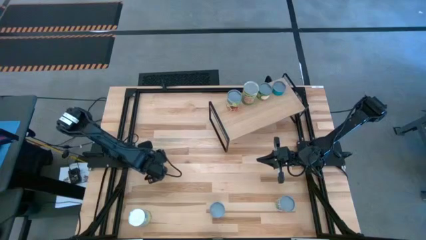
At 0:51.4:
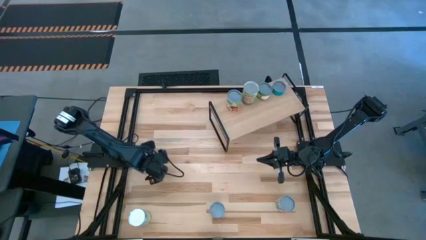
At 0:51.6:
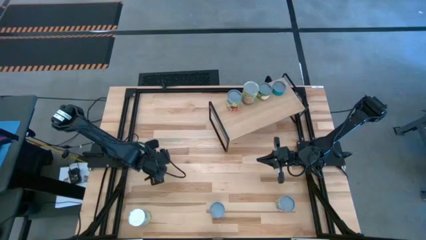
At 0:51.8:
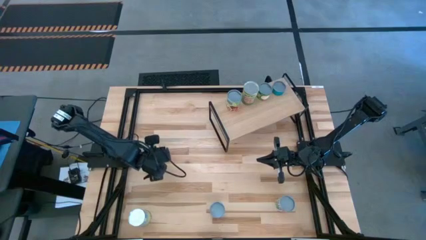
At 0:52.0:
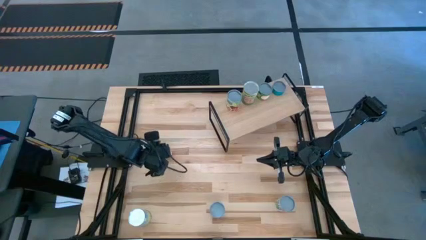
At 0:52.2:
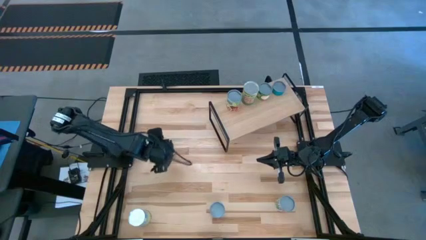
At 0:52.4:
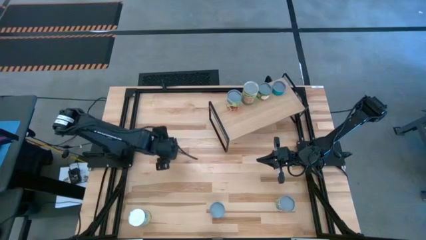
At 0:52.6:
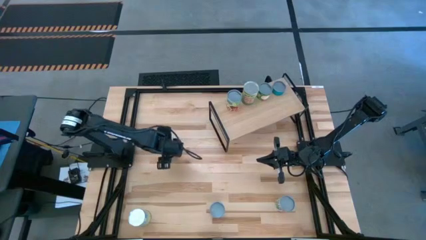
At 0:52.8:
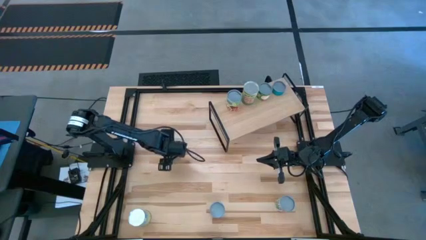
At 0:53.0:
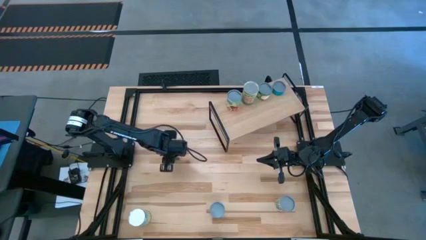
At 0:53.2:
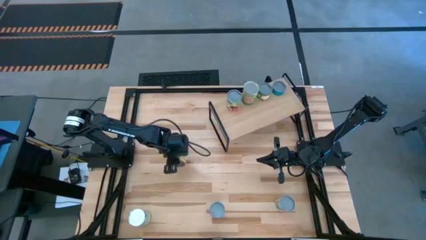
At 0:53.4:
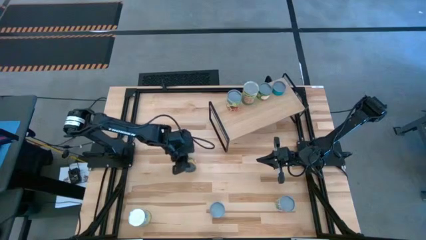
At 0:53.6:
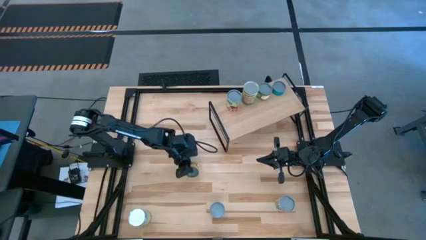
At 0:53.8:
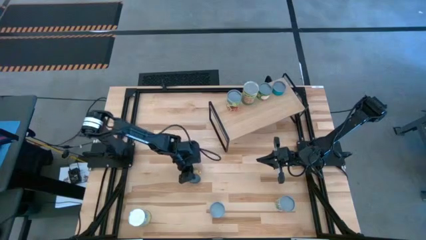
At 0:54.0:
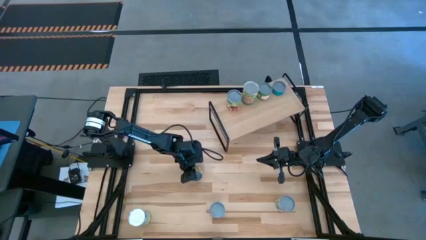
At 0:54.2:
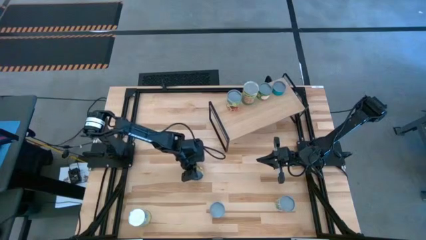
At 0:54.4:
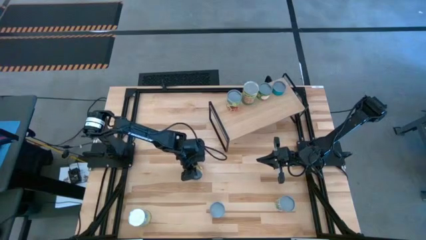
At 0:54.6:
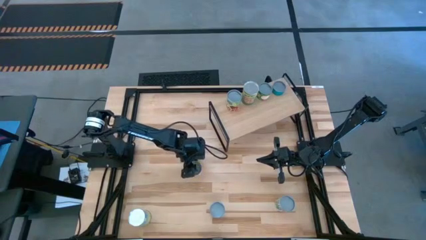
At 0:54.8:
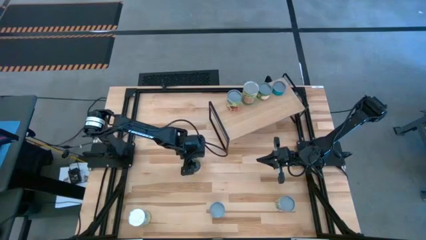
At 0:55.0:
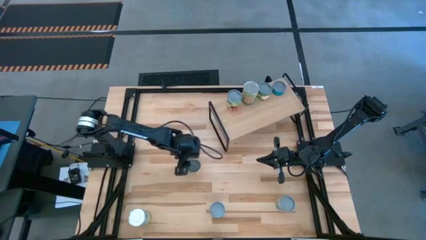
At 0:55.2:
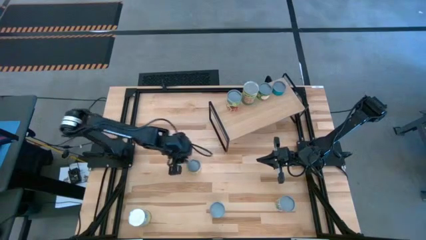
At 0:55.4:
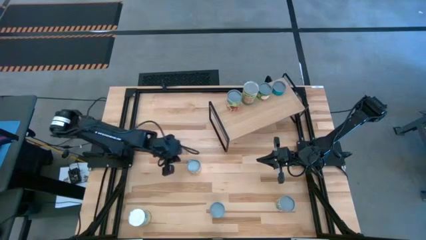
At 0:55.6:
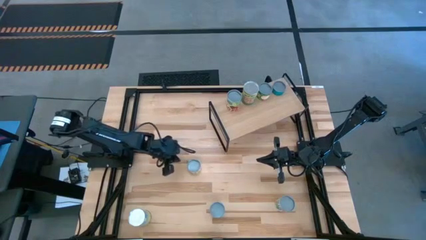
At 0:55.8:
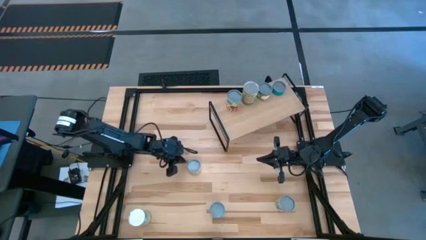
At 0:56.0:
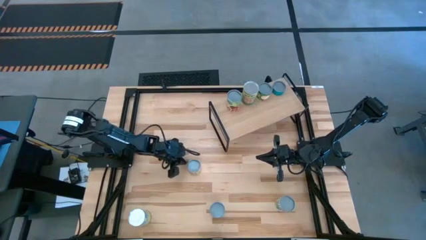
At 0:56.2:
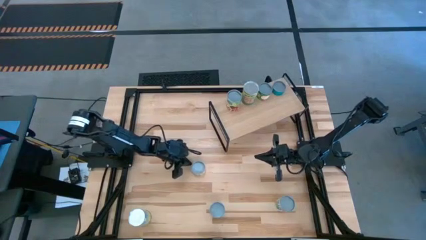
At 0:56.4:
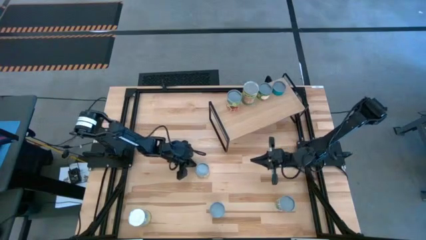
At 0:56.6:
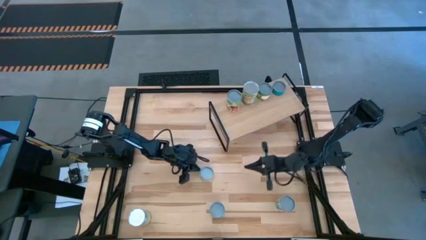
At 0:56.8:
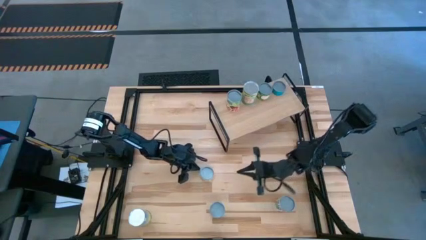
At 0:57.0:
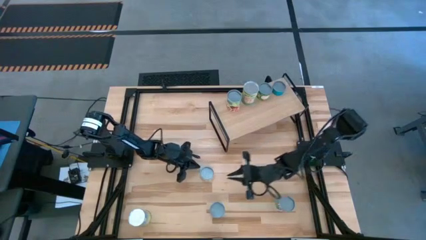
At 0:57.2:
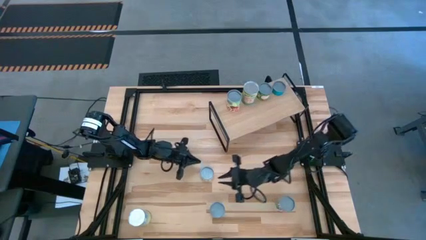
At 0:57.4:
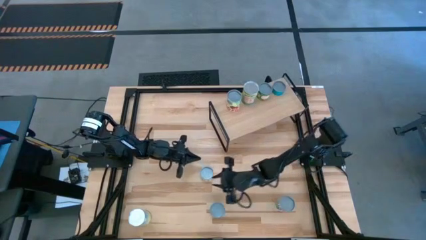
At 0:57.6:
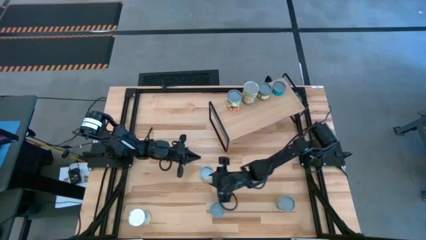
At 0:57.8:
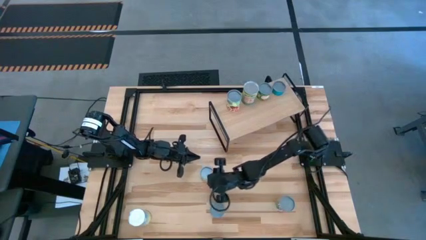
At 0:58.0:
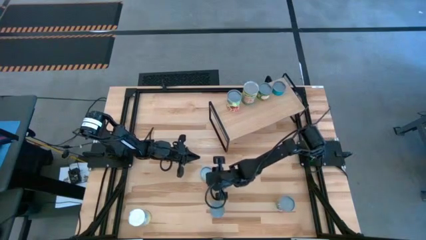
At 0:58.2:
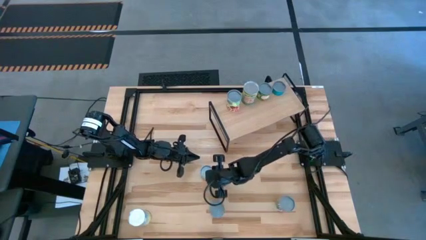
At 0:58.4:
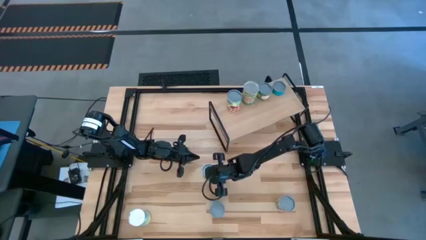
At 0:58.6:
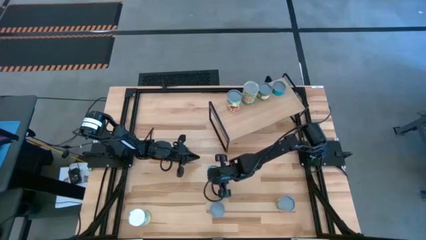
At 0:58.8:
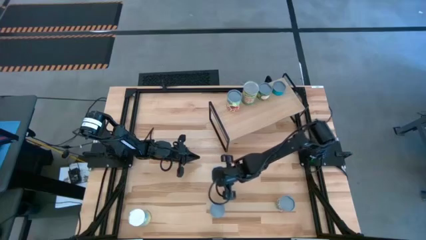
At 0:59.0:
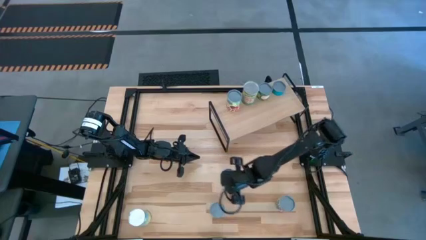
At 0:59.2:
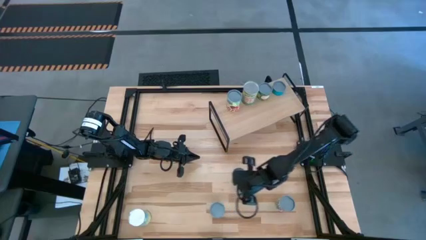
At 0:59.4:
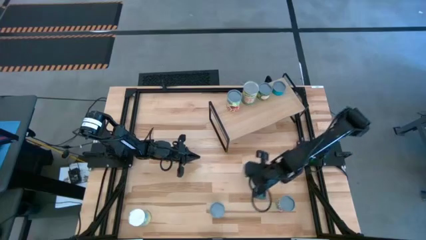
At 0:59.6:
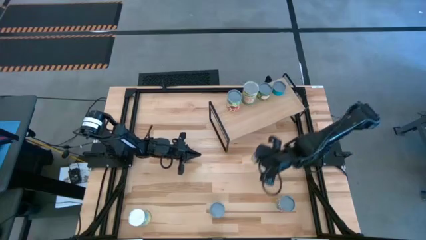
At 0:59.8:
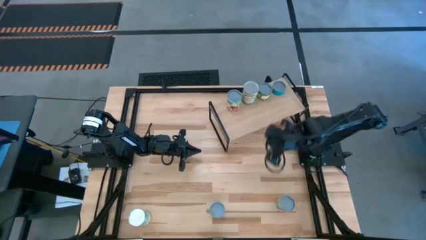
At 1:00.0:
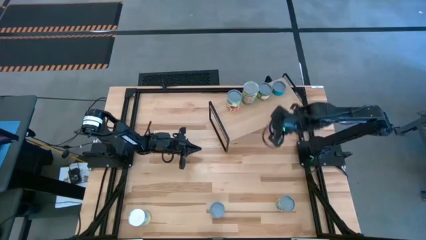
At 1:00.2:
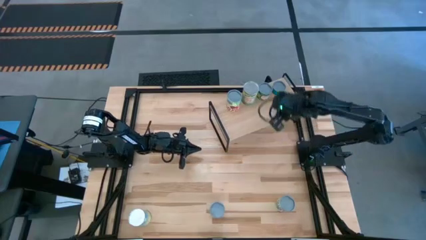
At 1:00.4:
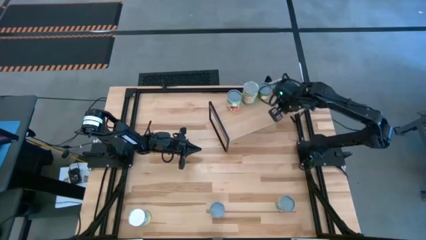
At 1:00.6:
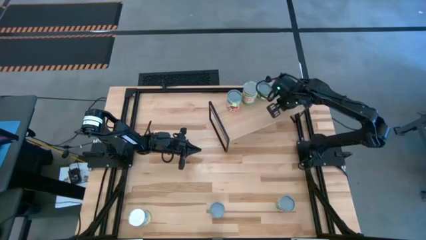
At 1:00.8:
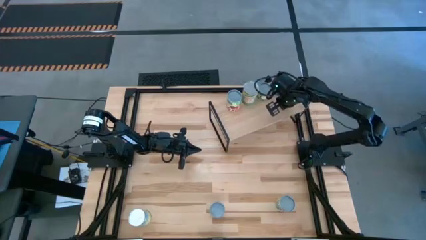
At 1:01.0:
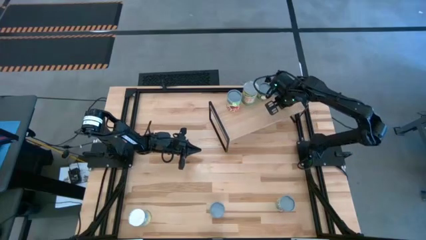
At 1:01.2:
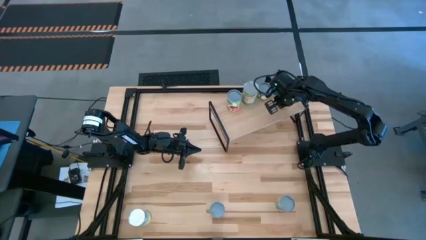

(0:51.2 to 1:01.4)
Task: Pick and place cans onto a shelf
Put the canned mushroom on the shelf
